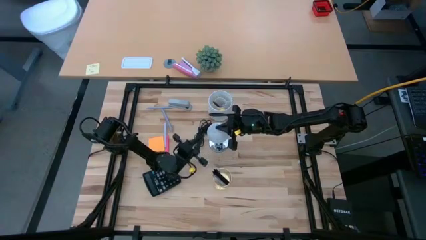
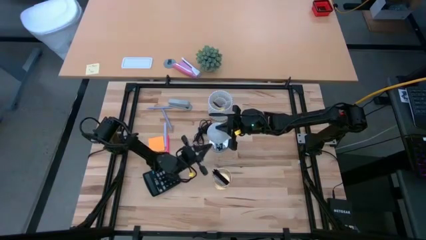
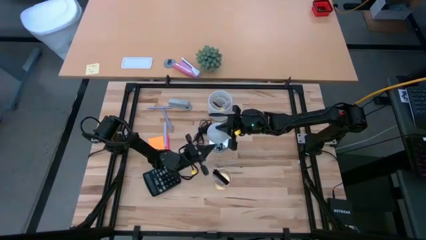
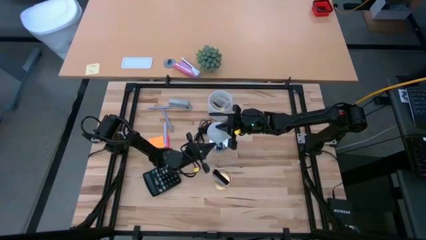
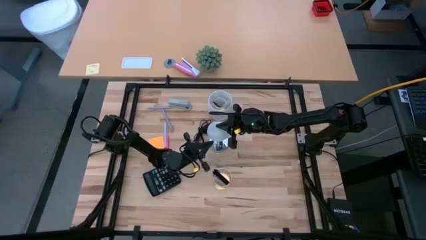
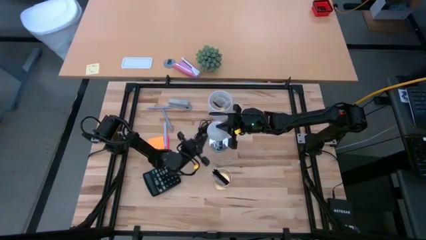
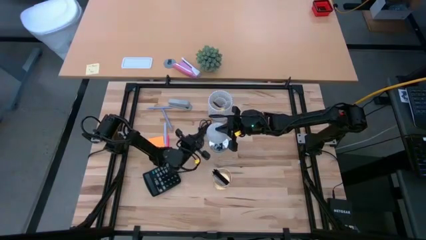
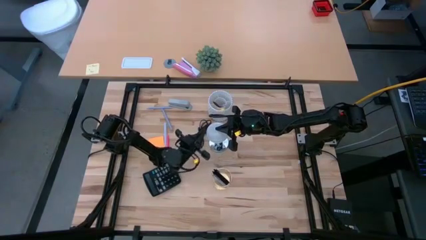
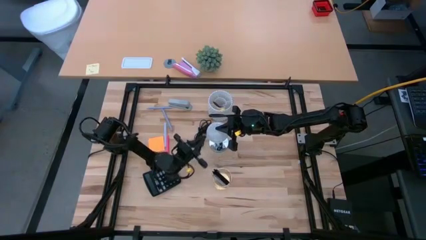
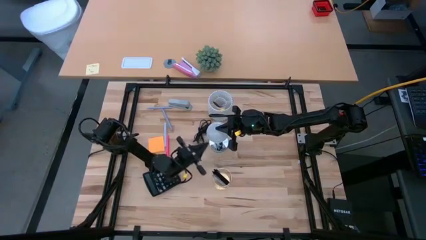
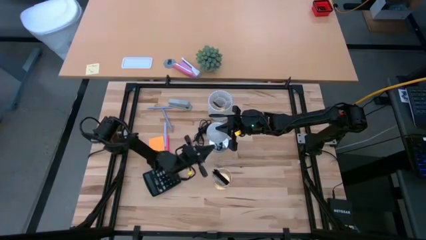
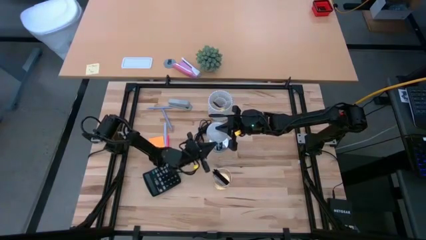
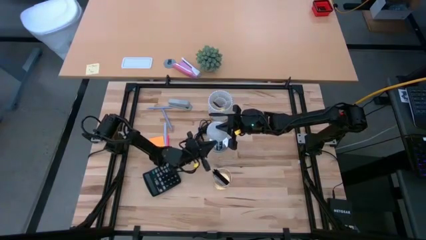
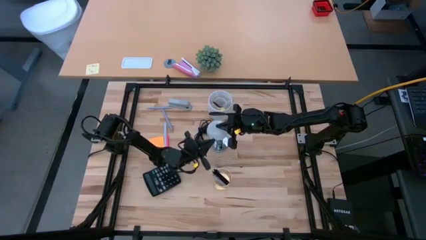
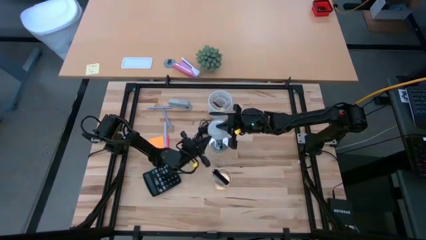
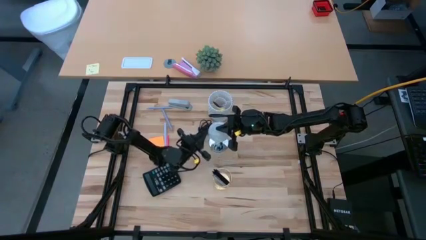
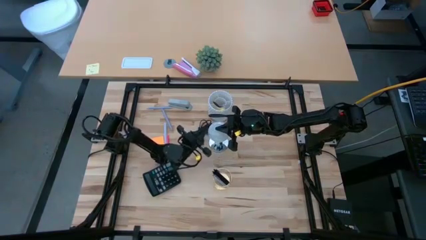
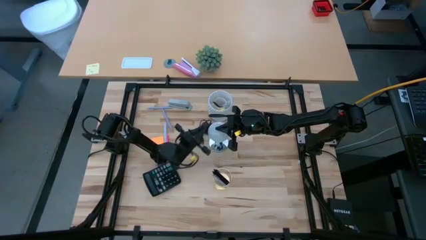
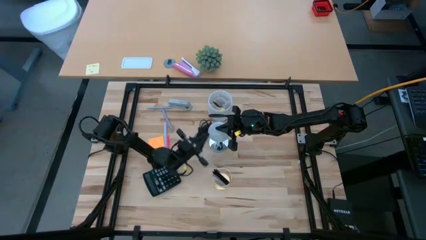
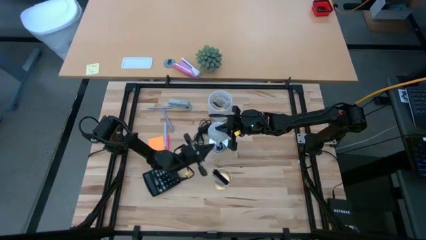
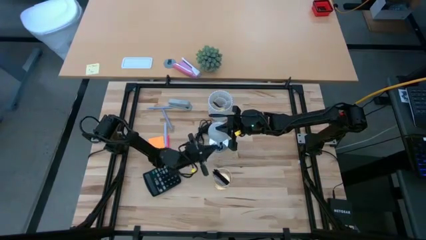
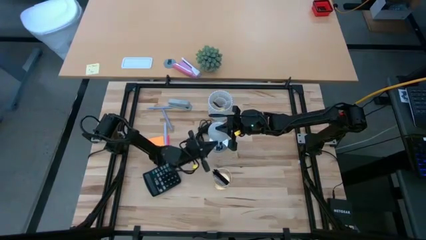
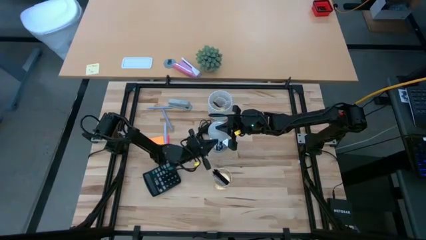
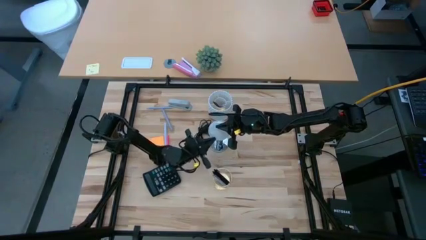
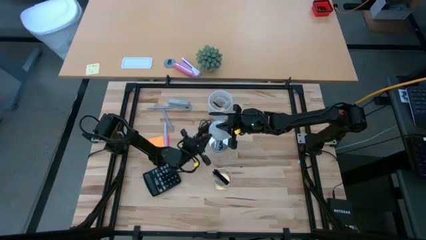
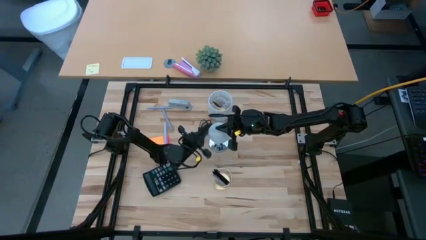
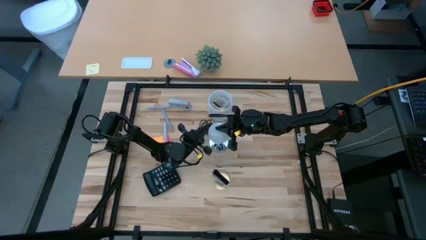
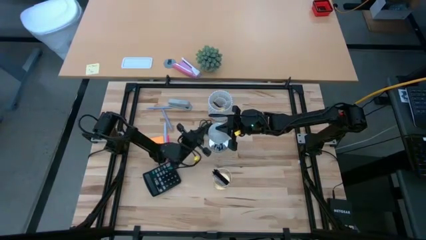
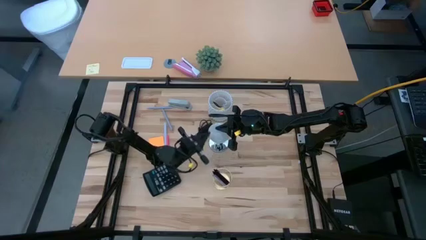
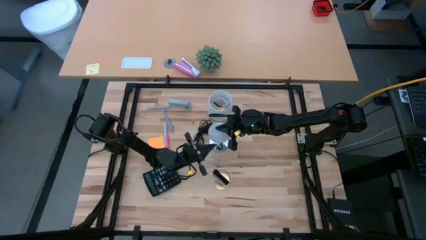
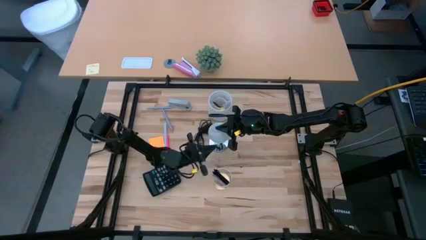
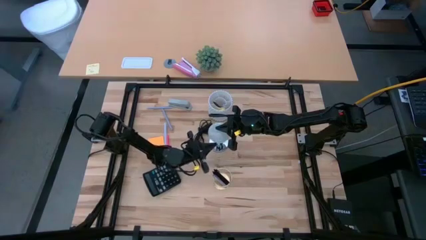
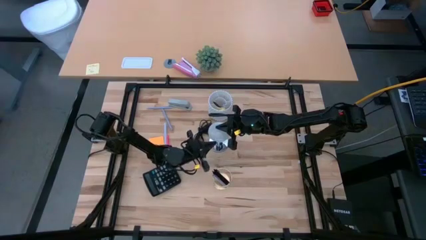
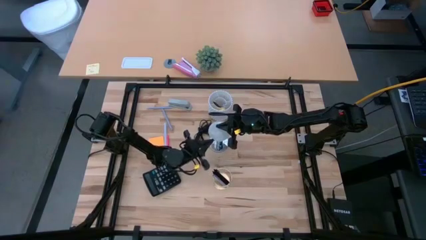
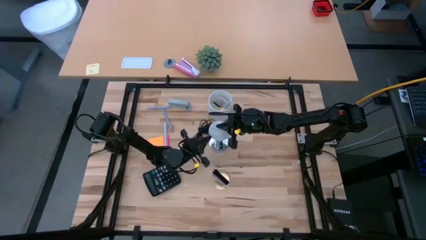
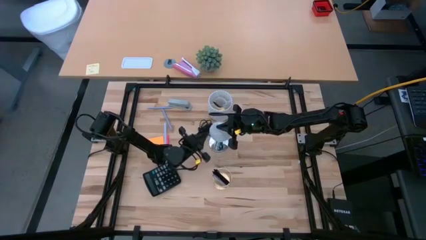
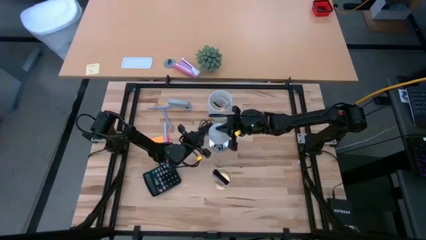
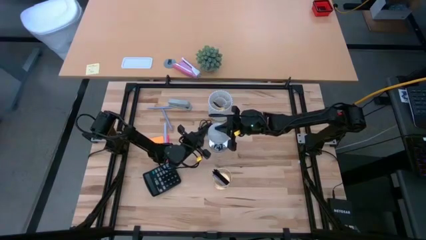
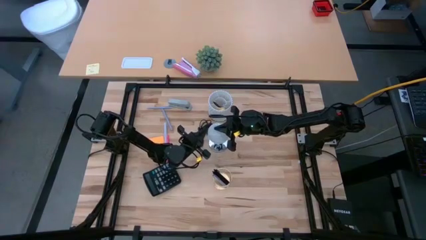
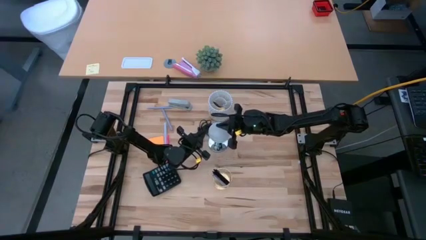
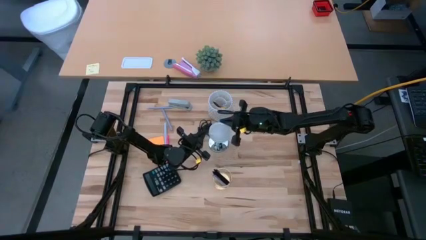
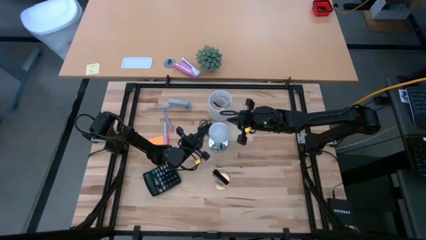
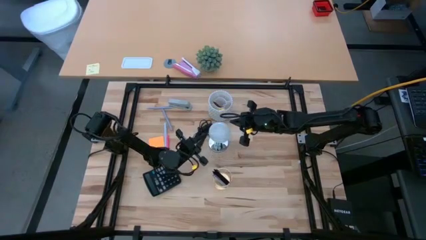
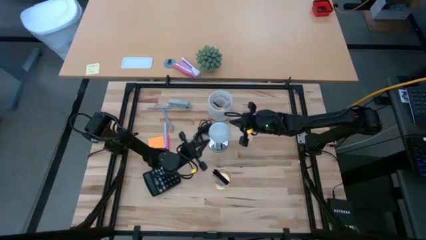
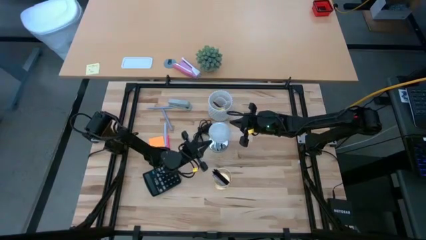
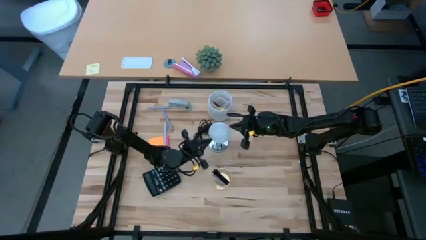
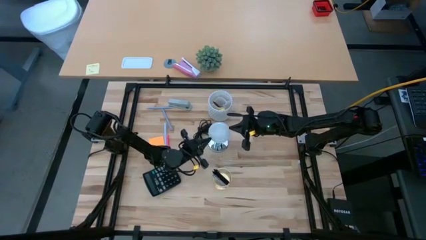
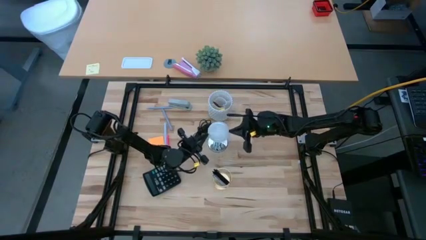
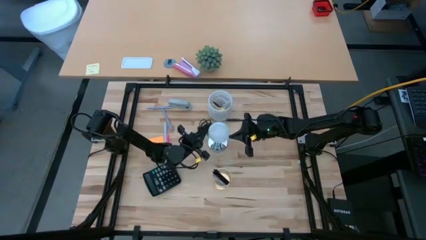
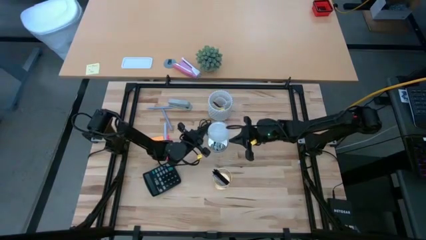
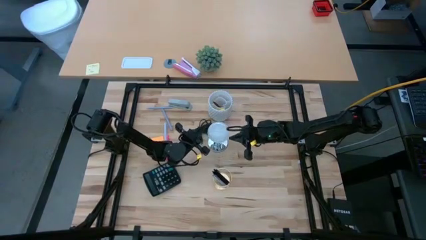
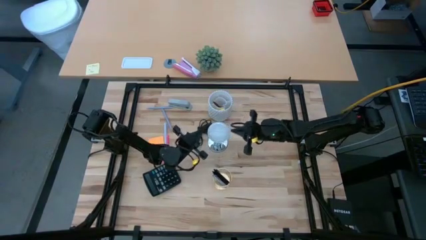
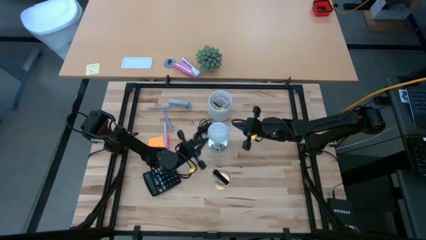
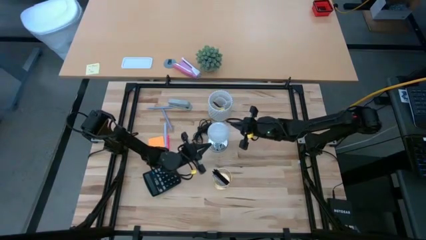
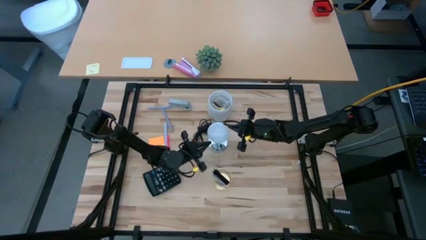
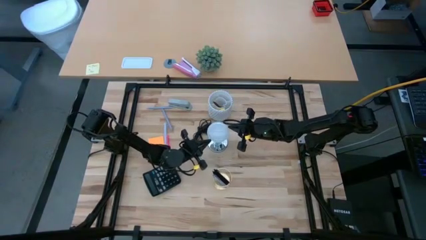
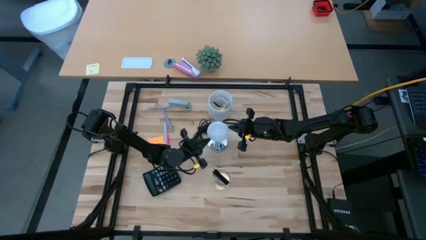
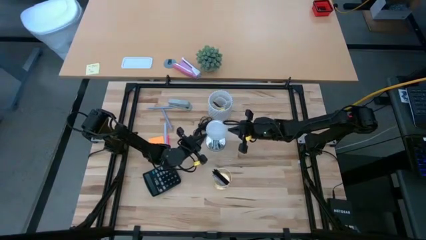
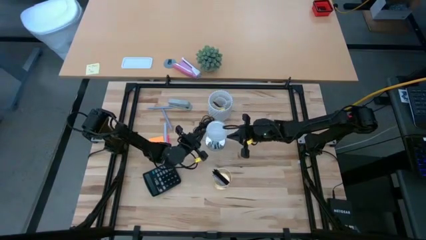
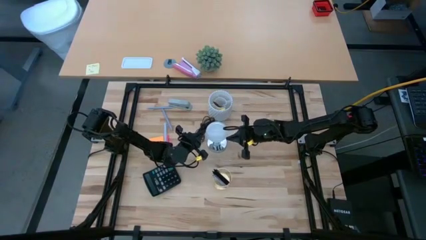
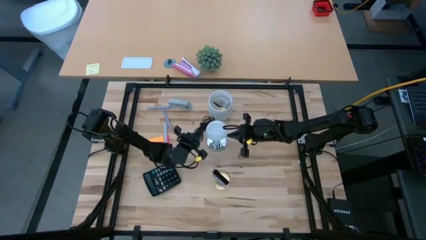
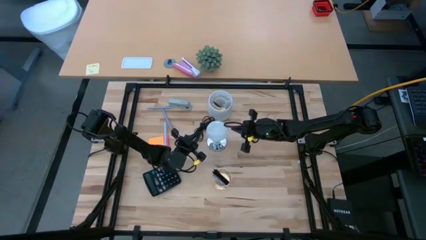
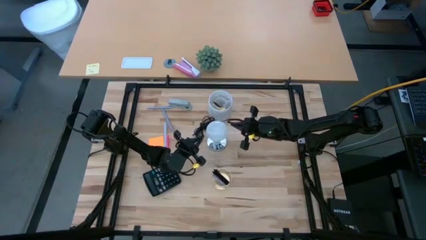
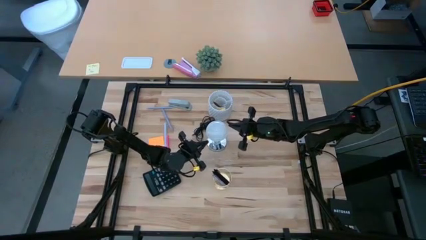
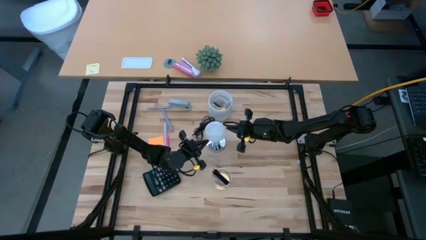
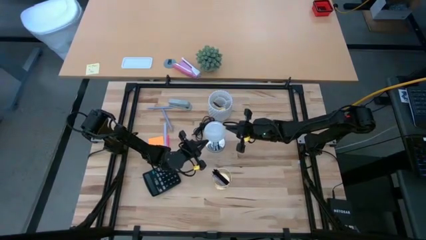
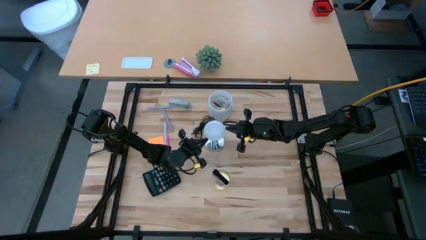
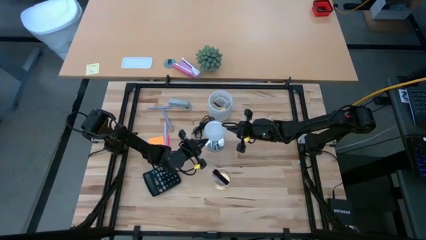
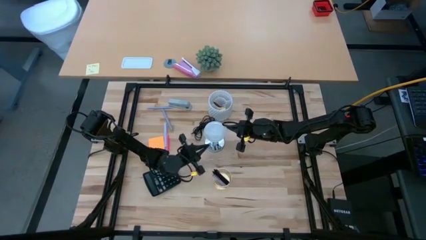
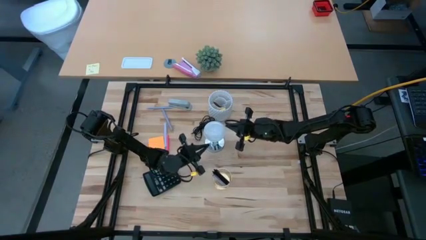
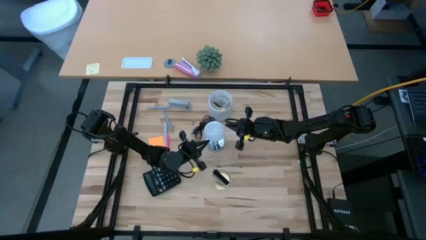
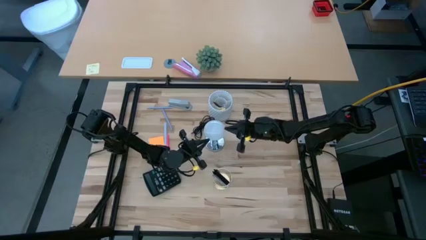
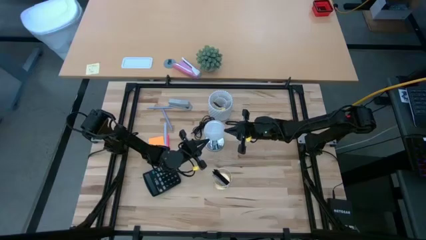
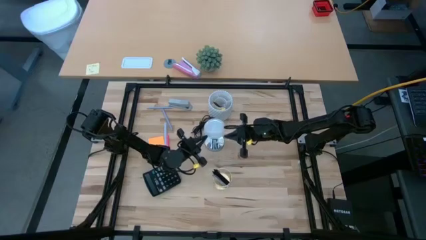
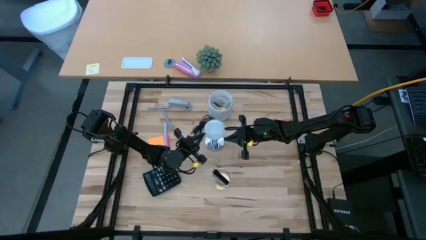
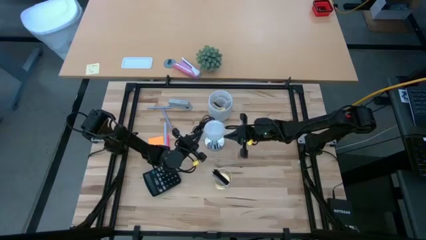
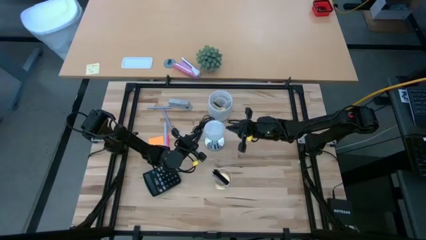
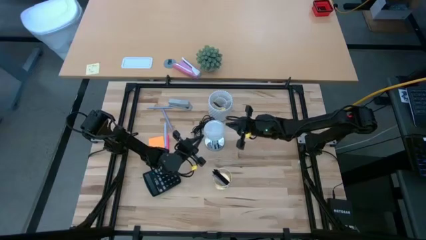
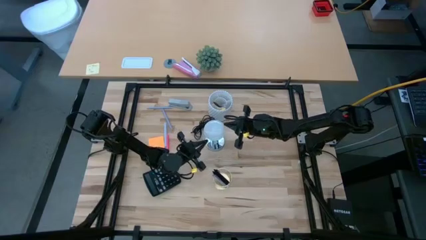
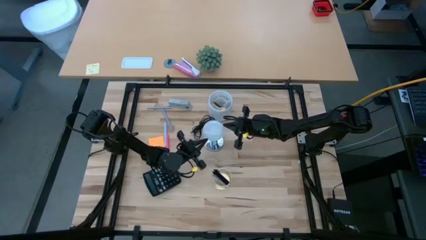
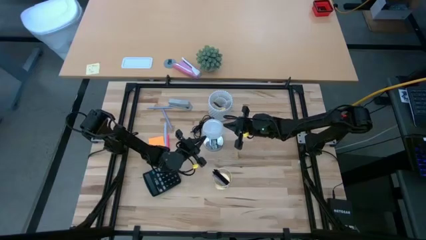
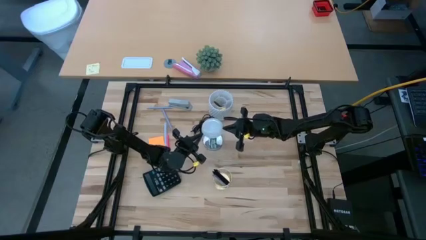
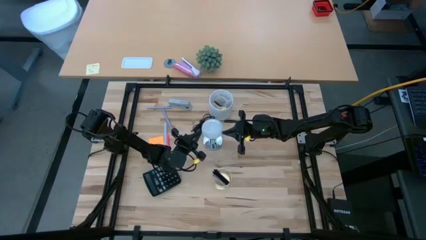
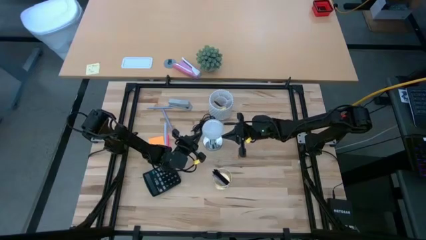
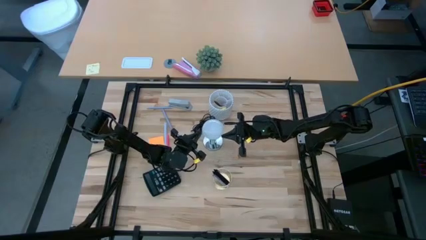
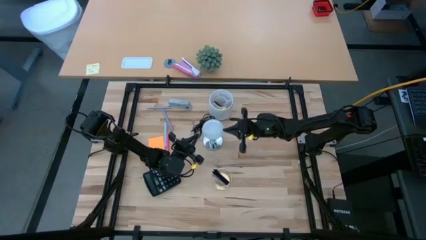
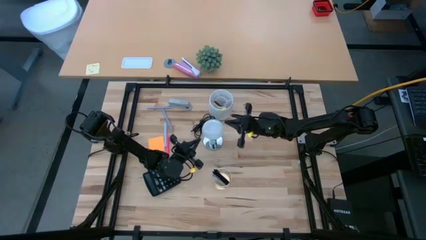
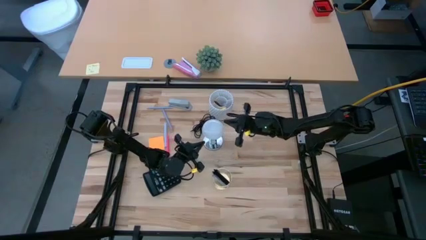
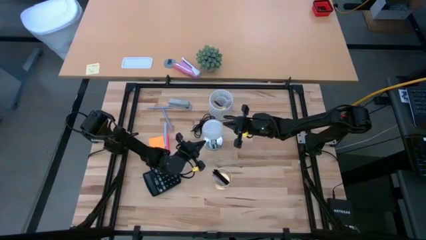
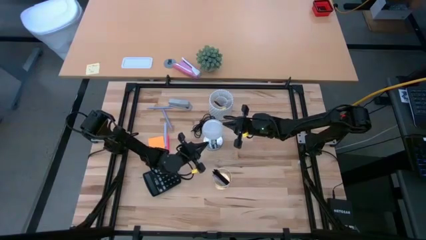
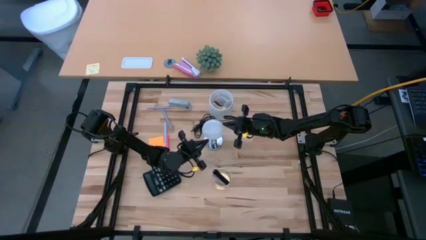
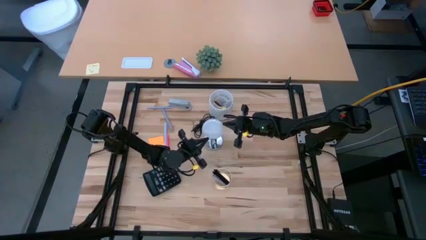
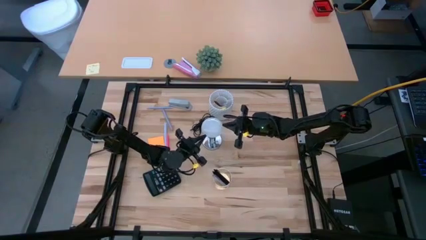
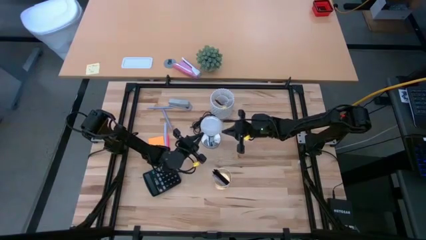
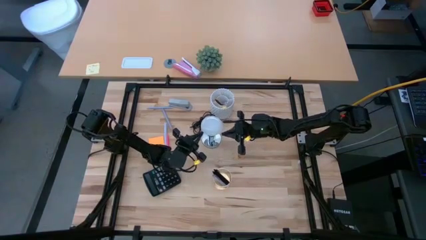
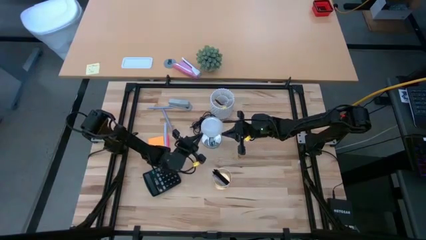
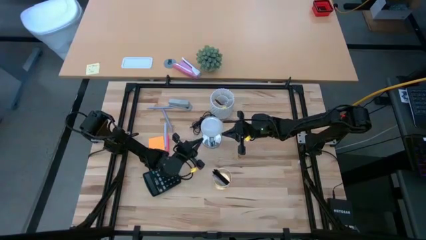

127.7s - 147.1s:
Task: Screw lightbulb
Insert the lightbulb into the lamp
